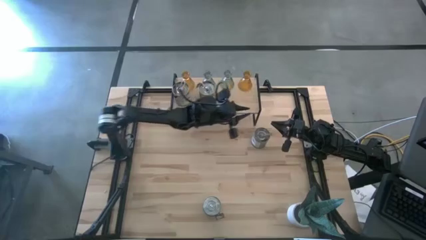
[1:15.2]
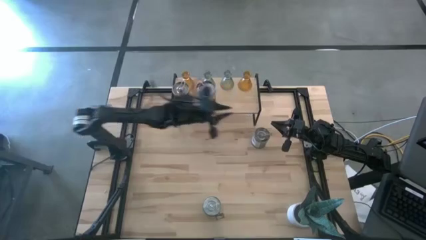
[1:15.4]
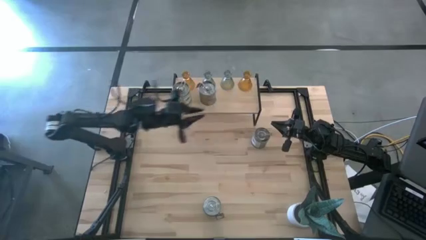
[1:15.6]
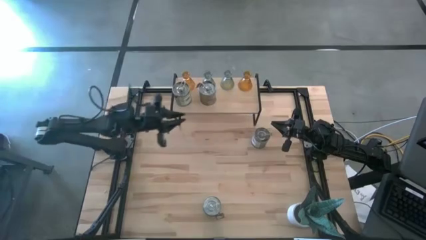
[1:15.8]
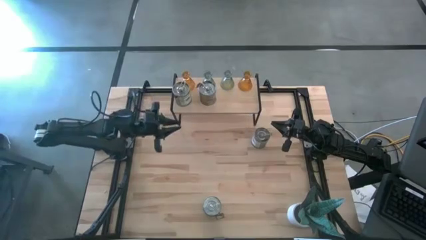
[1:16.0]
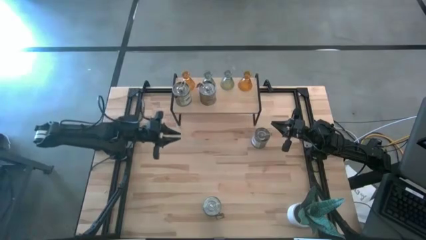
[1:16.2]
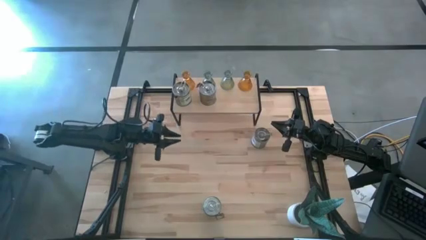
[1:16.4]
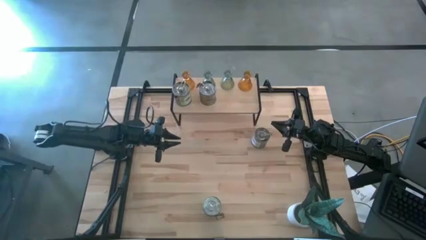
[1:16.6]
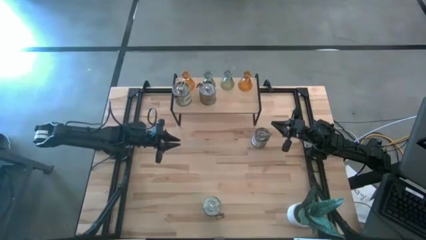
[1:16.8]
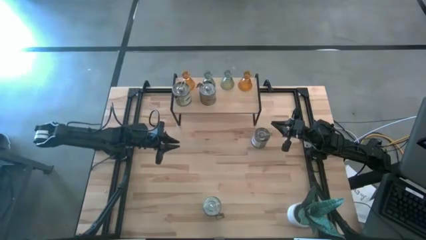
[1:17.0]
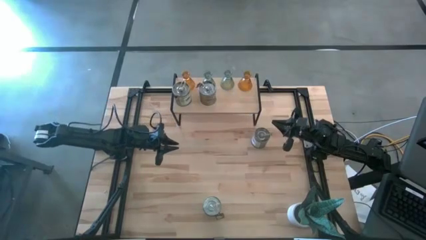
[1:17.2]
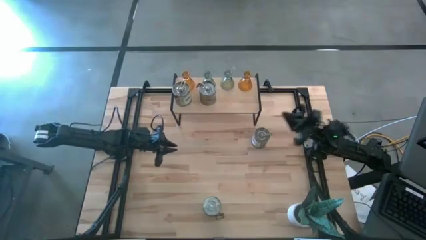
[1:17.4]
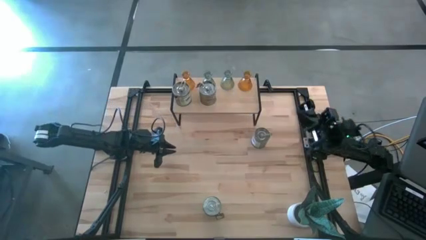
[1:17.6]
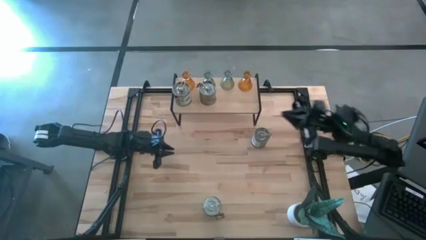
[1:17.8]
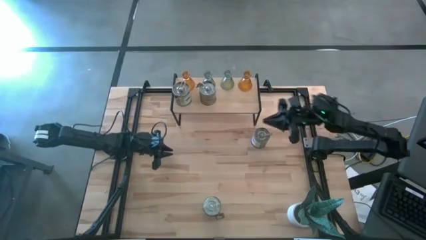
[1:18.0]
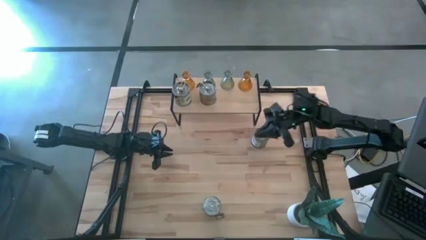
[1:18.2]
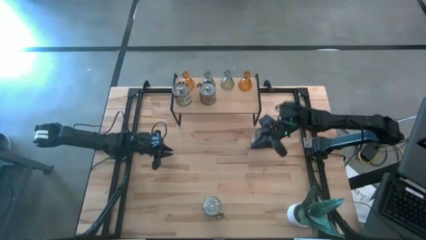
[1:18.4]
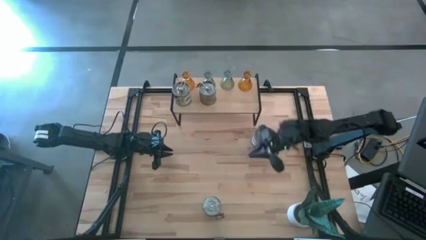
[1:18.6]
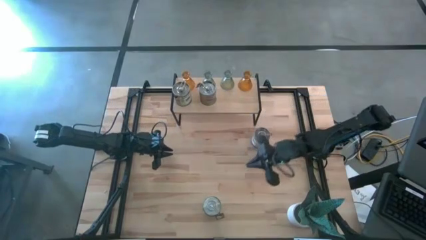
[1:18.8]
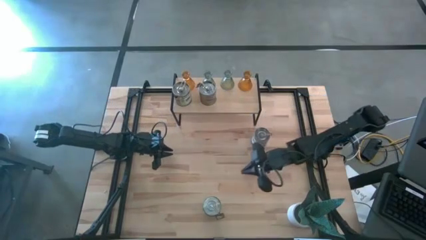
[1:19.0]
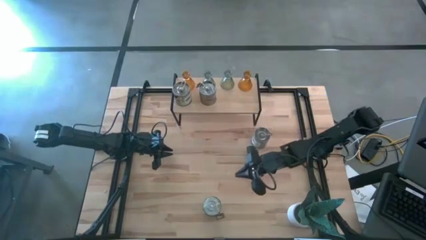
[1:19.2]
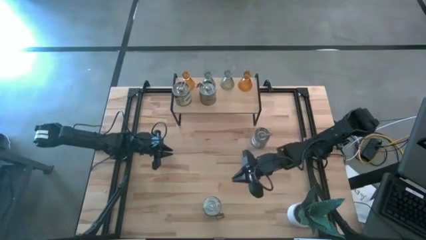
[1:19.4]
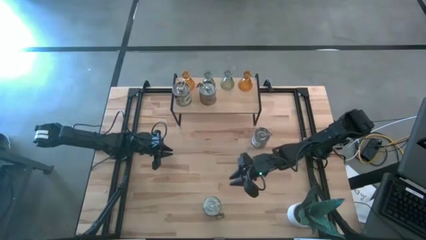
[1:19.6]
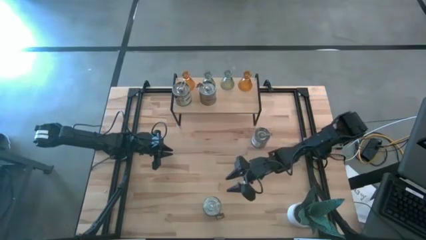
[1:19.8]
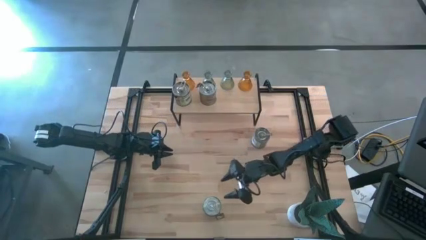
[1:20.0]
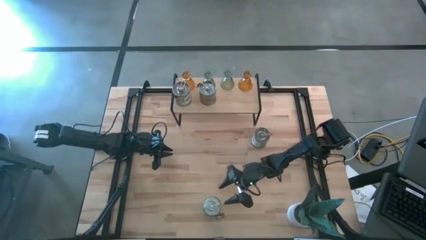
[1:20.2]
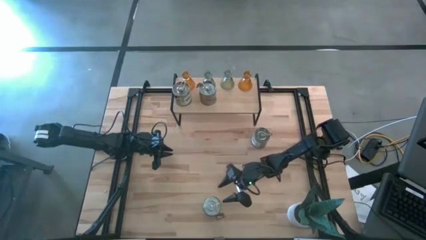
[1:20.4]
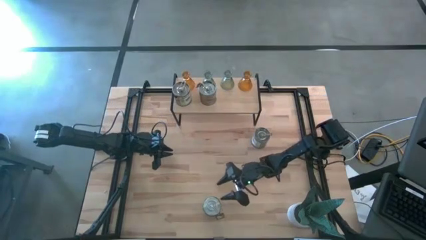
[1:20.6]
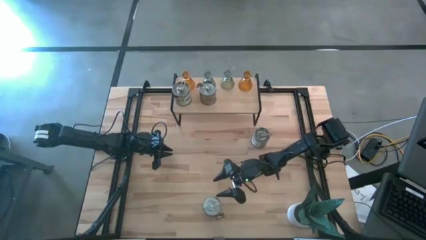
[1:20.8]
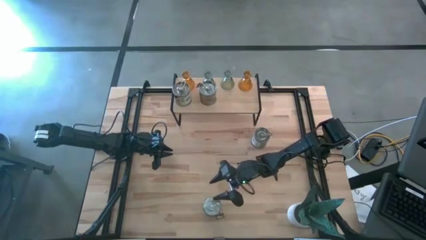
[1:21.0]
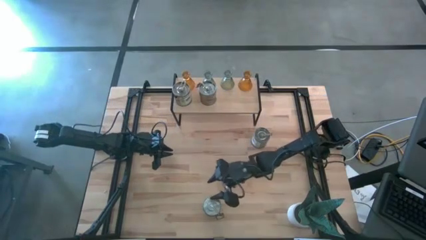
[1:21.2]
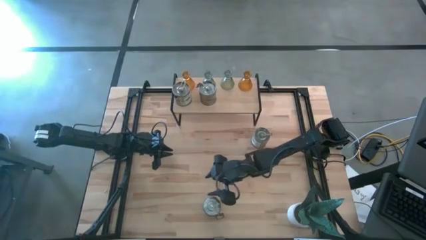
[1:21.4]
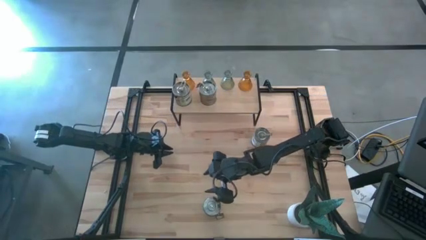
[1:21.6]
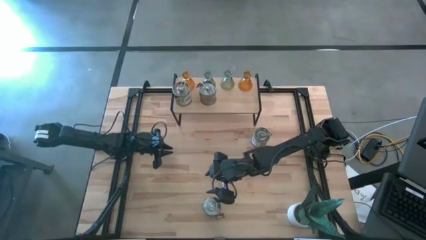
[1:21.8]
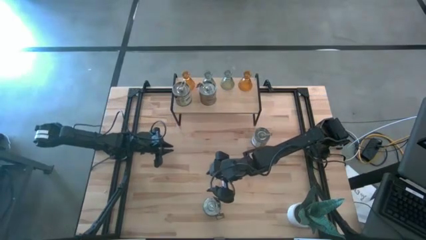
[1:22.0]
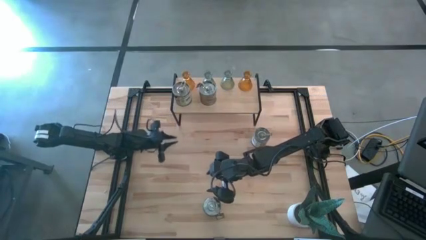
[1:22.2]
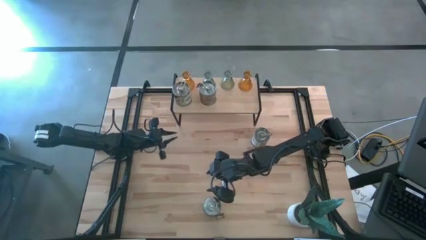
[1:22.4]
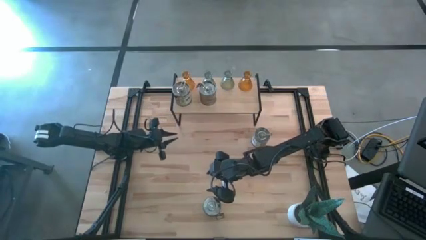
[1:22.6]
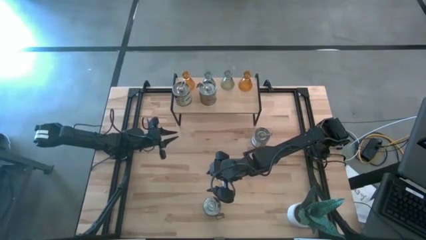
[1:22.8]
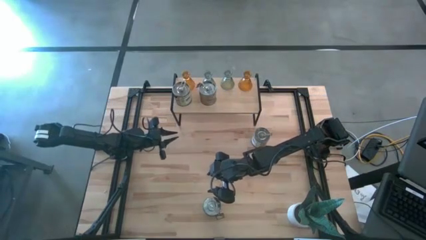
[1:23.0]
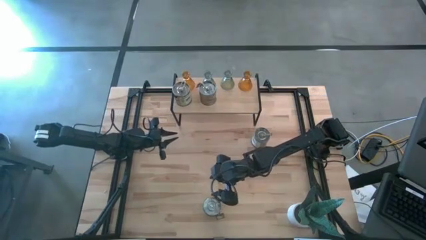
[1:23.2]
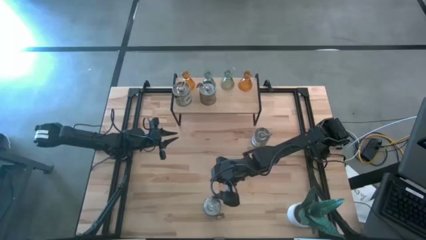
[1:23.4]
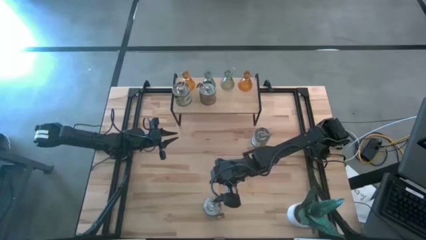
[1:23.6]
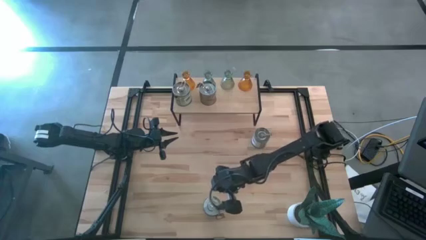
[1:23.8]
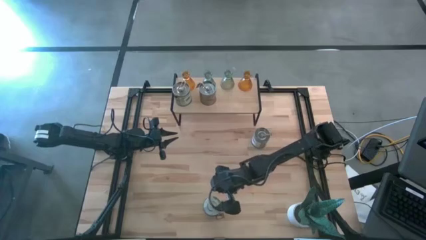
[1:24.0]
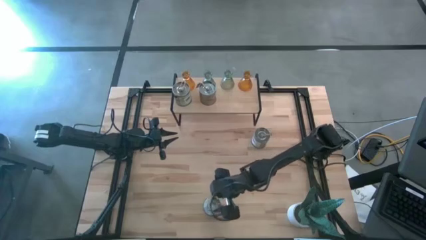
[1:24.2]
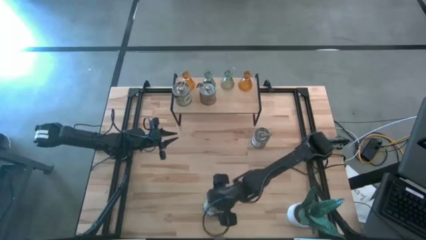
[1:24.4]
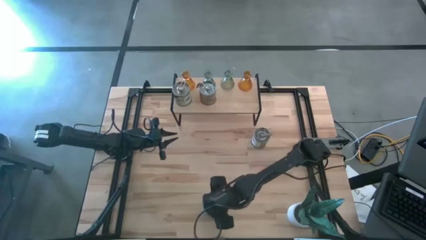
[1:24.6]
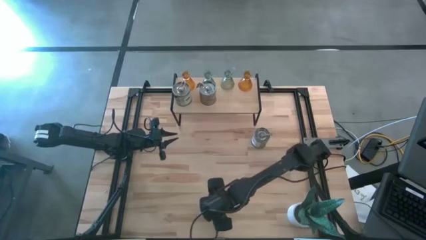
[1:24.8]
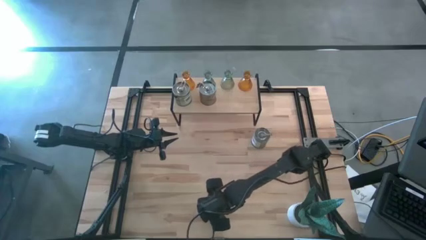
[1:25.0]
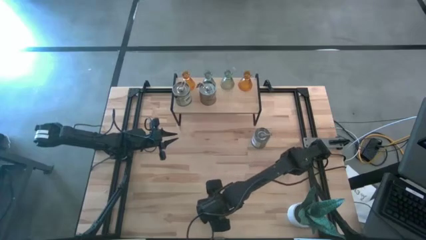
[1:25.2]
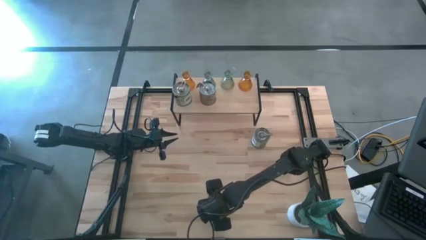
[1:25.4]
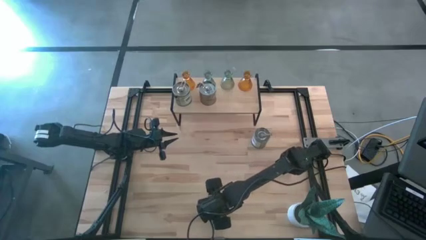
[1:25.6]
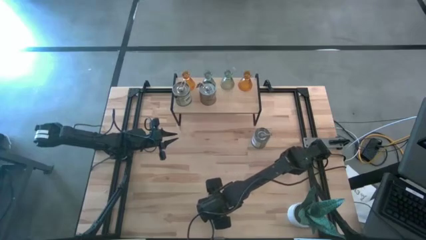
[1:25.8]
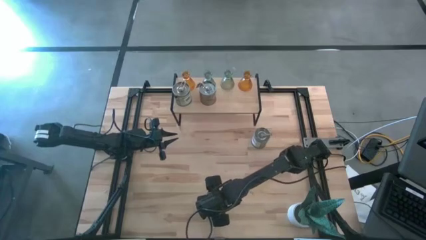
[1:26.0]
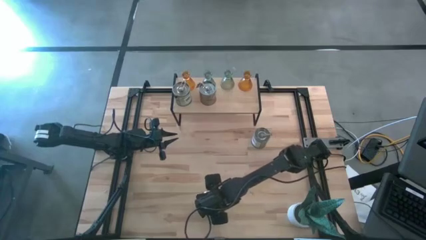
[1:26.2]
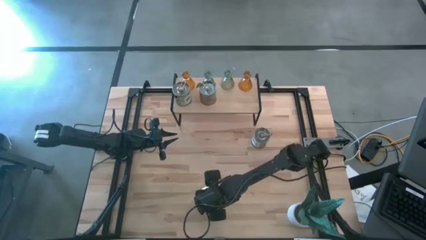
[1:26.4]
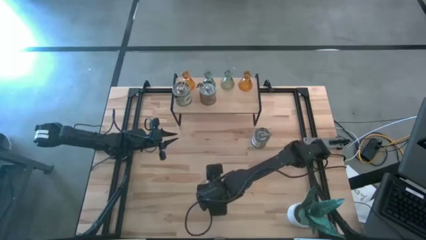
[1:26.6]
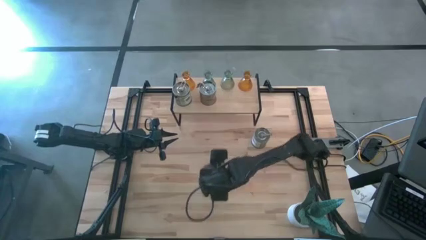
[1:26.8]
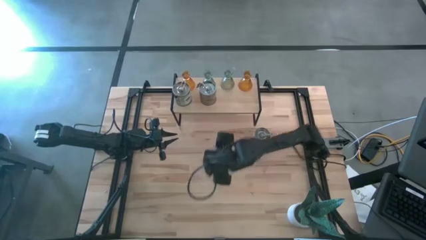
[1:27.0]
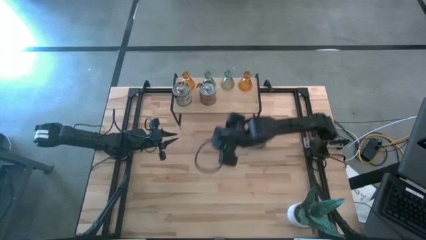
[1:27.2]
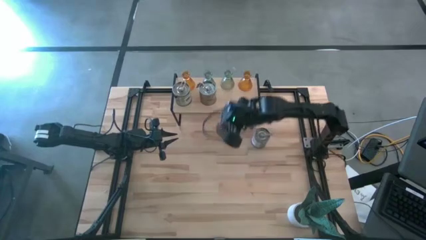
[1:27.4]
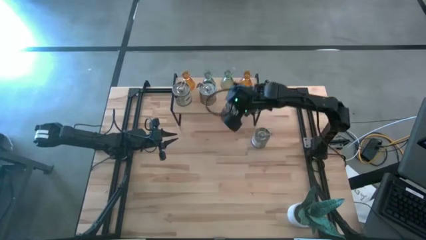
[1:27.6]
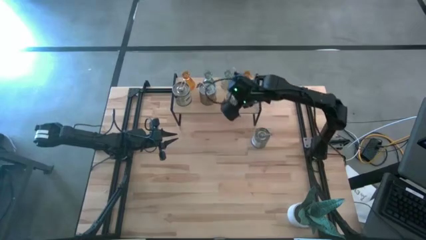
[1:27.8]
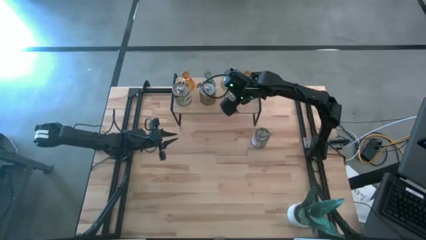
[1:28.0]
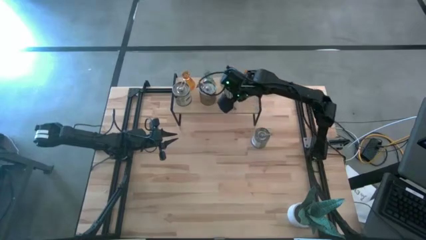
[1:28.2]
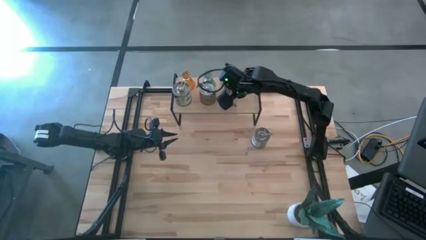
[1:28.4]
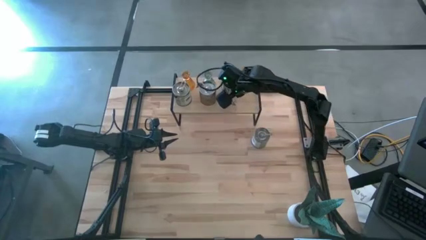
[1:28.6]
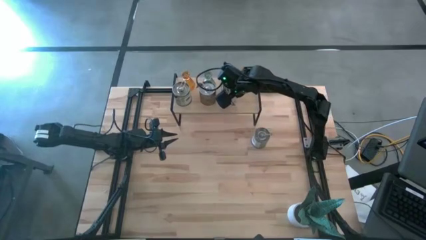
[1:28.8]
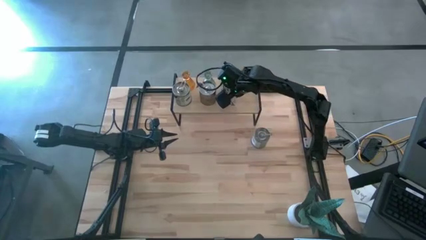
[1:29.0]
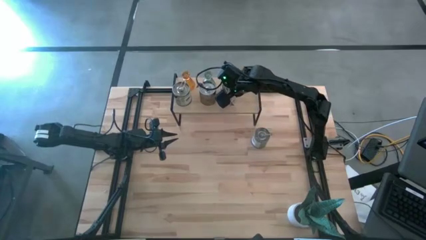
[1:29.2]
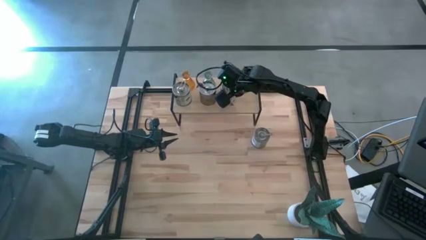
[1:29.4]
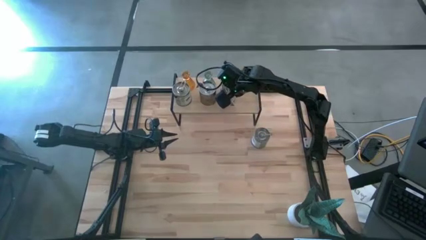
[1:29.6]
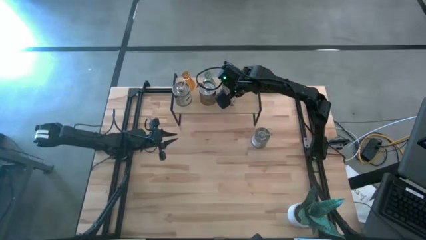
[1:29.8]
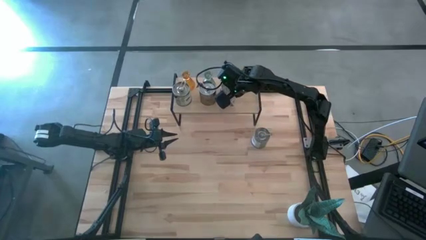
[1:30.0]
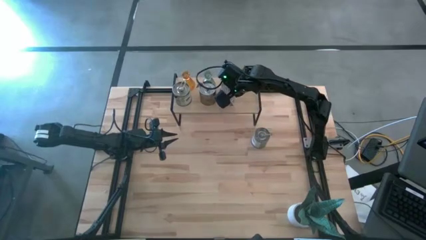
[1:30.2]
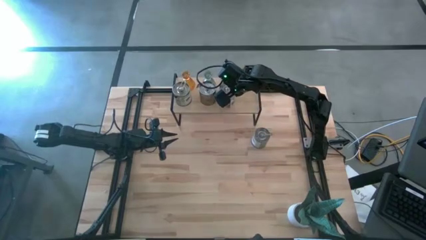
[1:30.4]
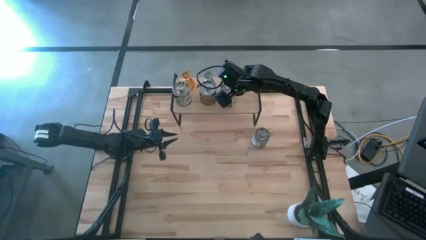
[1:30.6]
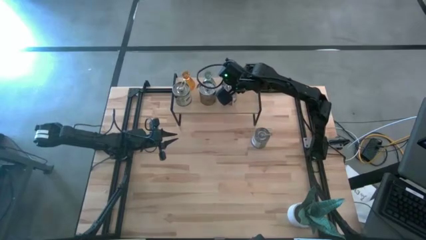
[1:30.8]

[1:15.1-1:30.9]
Task: Pick & Place candle stick holders
Put the jar candle on the shelf aligned with the other jar candles

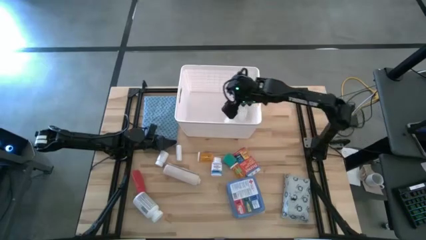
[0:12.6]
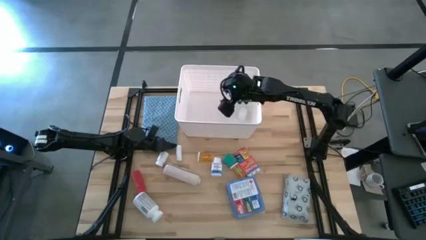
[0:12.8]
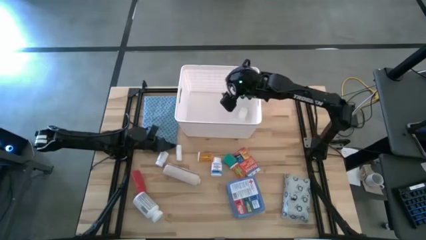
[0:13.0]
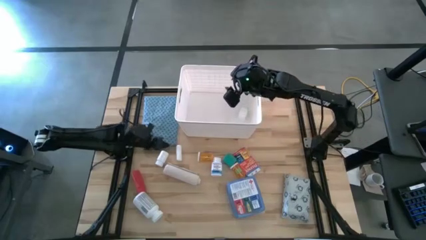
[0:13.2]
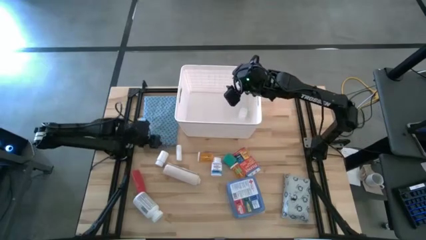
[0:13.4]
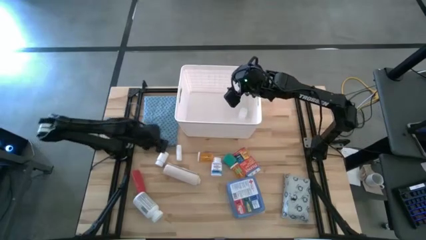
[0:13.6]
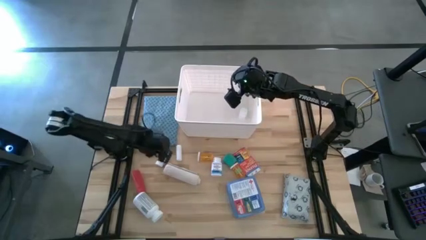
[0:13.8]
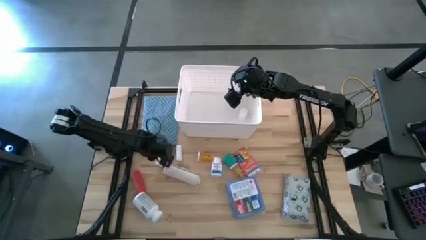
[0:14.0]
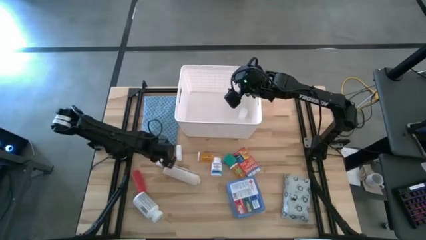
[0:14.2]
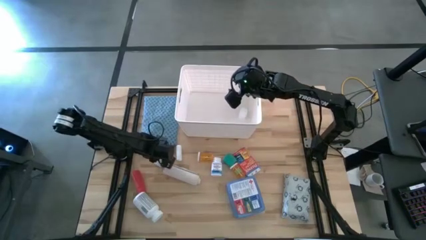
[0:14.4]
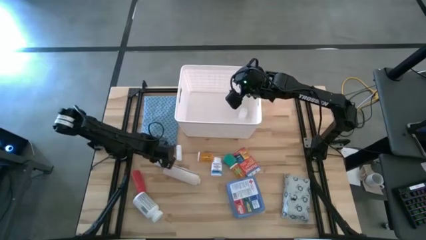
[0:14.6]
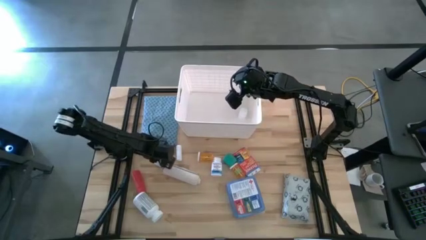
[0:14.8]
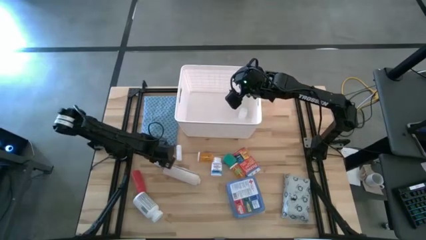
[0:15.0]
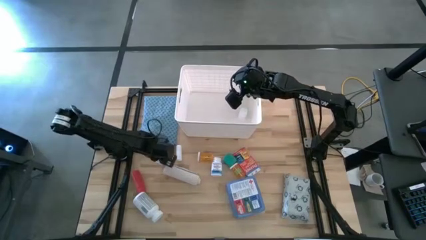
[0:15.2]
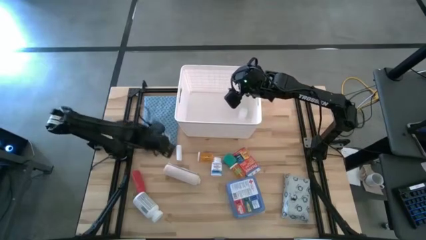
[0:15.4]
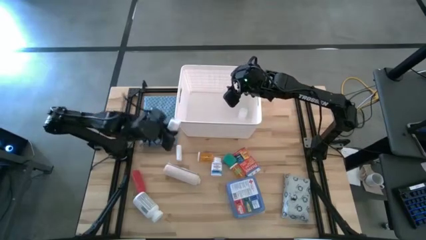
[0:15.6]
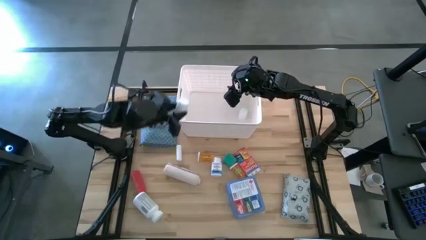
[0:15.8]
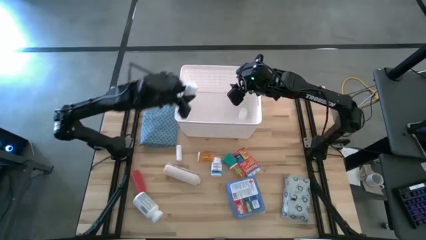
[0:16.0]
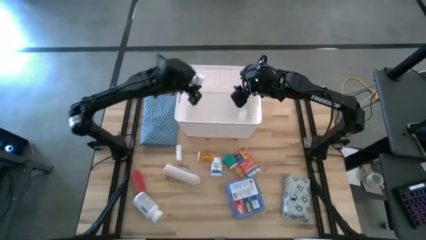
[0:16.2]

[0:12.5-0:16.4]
Task: Pick & place medical supplies in basket/bin
Put the white medicine bottle into the white bin
